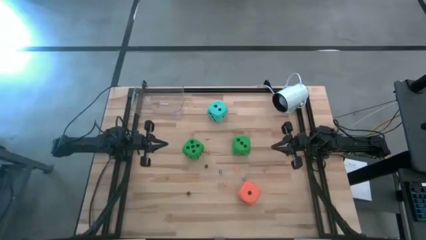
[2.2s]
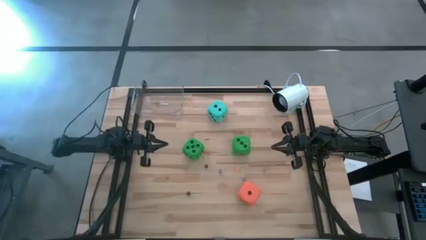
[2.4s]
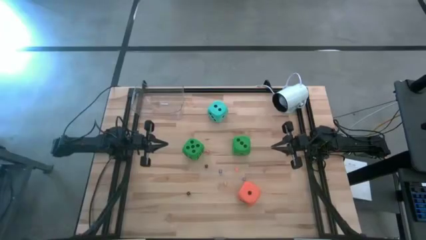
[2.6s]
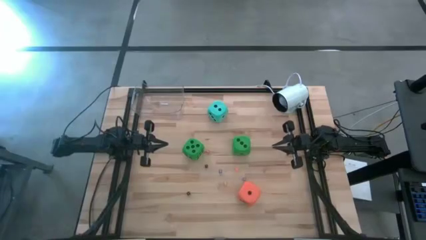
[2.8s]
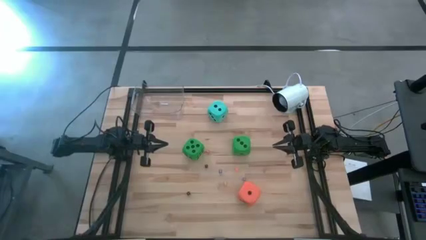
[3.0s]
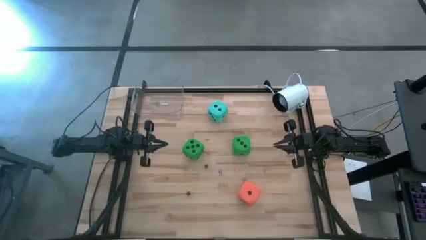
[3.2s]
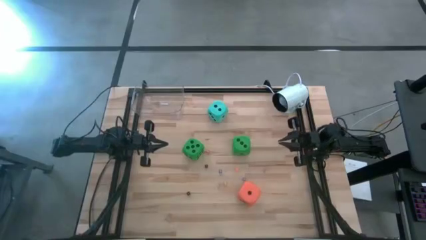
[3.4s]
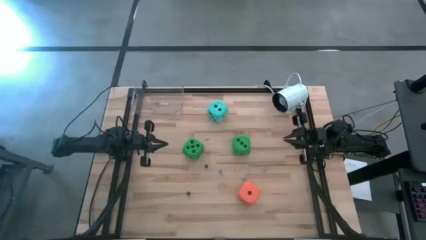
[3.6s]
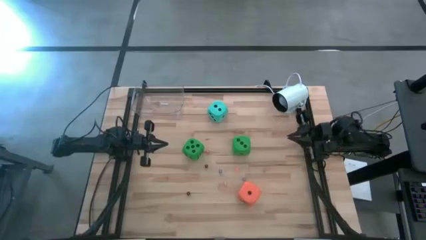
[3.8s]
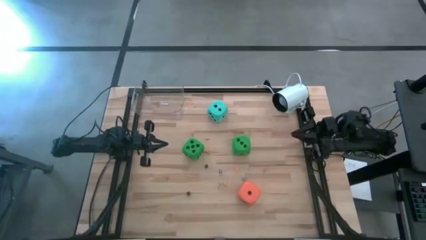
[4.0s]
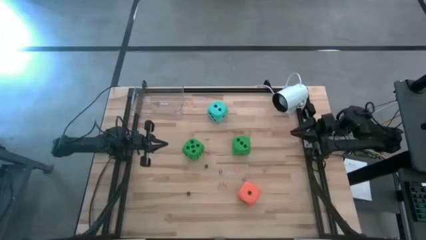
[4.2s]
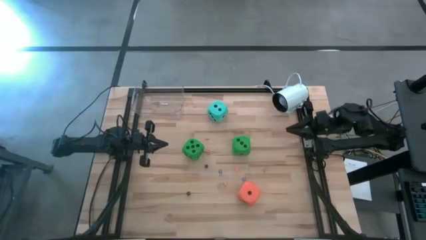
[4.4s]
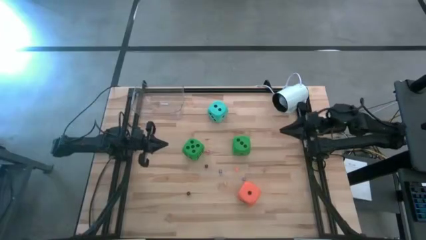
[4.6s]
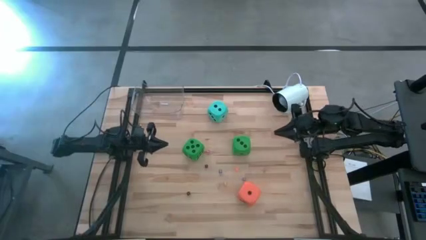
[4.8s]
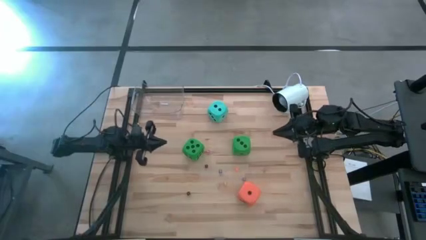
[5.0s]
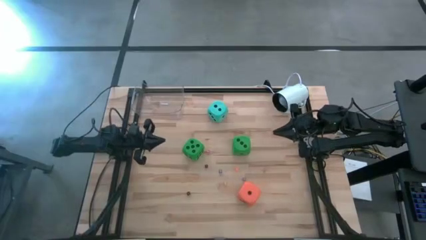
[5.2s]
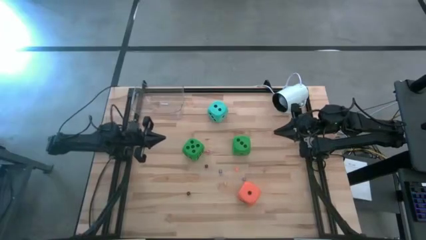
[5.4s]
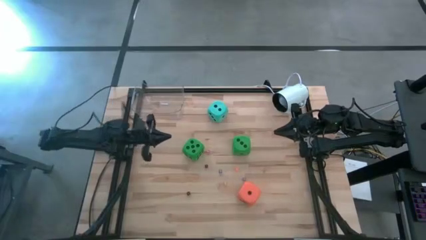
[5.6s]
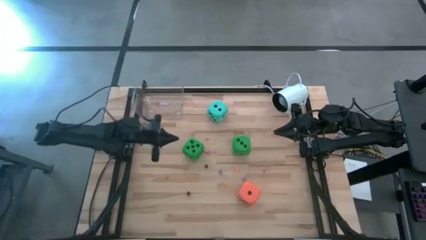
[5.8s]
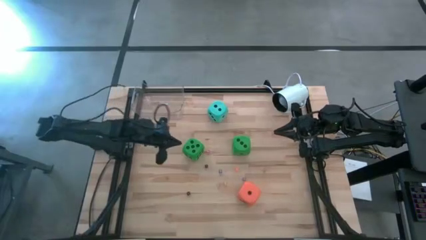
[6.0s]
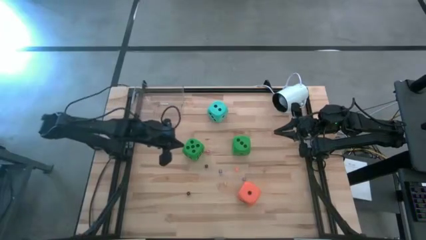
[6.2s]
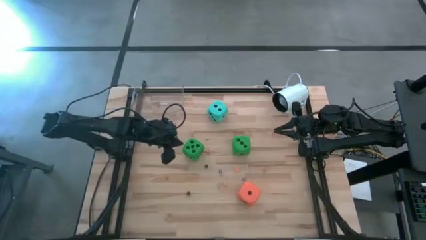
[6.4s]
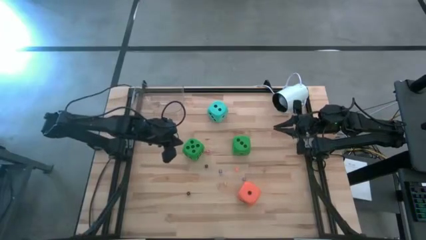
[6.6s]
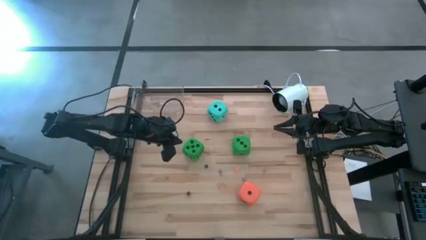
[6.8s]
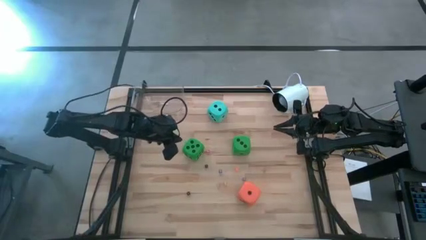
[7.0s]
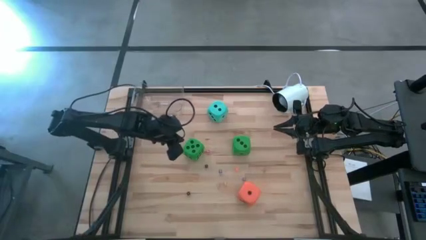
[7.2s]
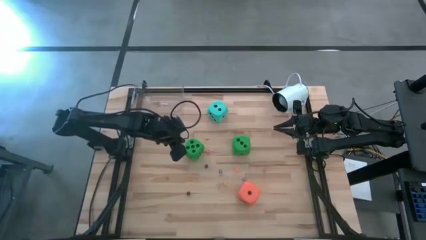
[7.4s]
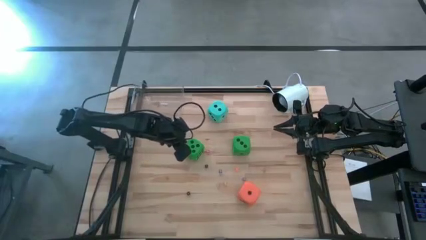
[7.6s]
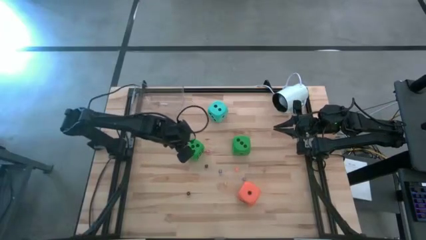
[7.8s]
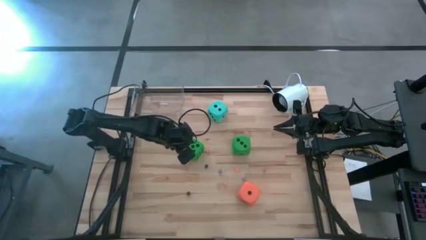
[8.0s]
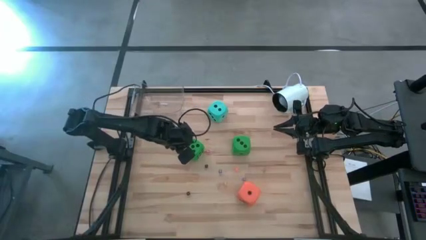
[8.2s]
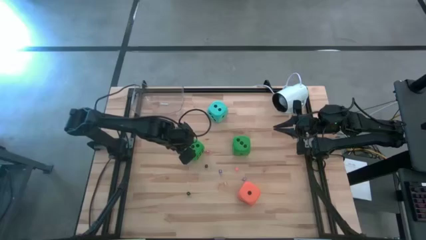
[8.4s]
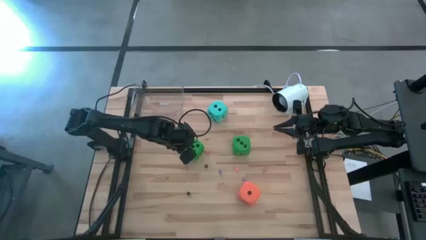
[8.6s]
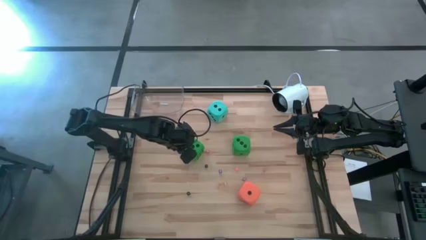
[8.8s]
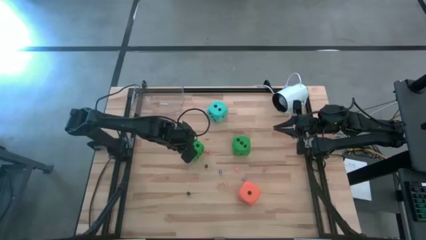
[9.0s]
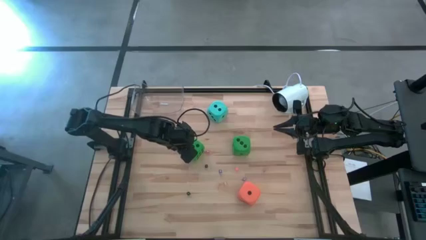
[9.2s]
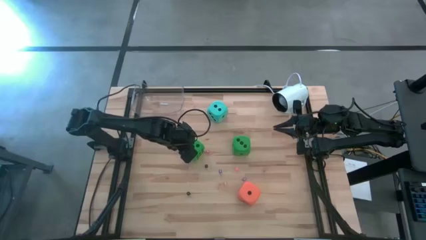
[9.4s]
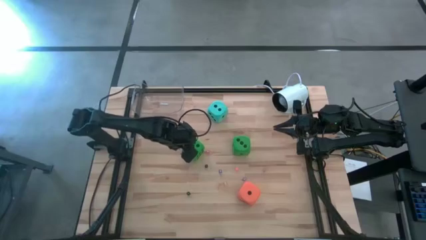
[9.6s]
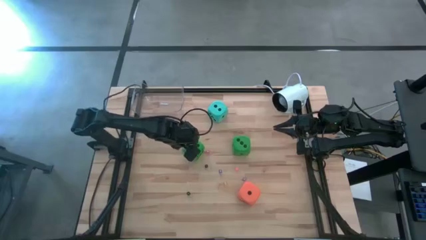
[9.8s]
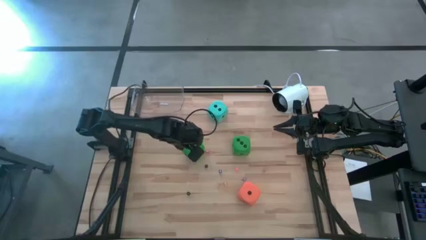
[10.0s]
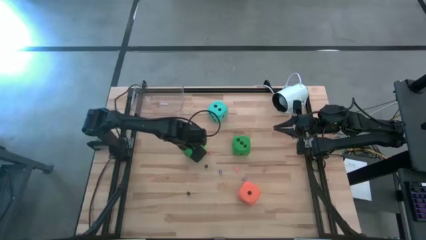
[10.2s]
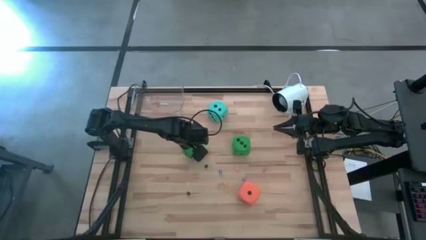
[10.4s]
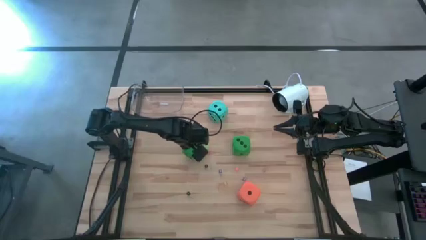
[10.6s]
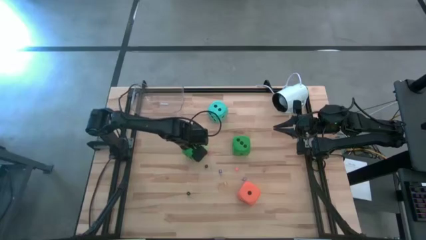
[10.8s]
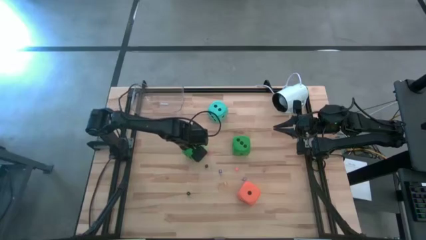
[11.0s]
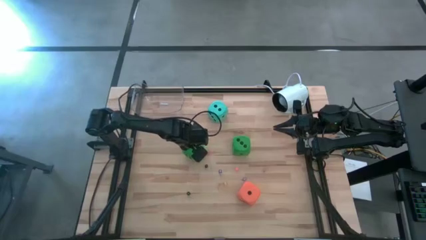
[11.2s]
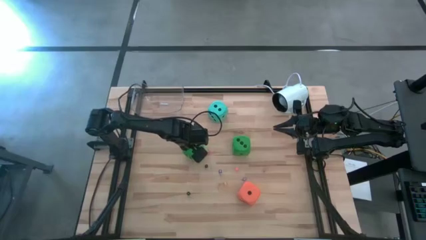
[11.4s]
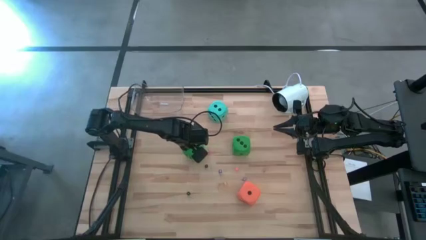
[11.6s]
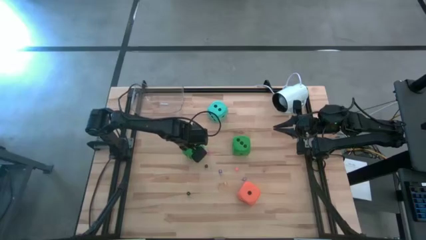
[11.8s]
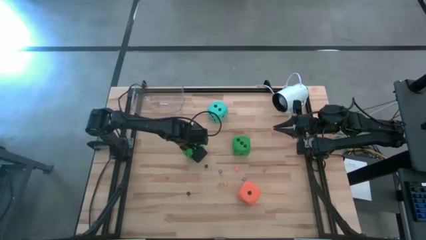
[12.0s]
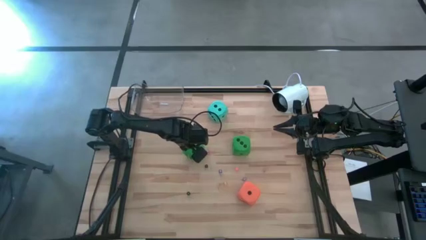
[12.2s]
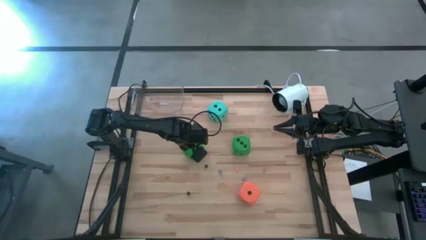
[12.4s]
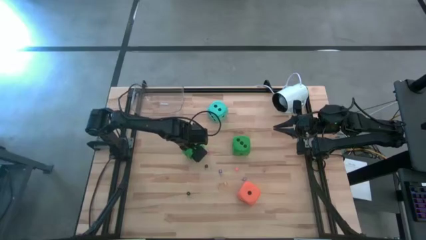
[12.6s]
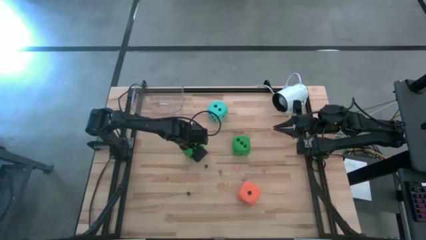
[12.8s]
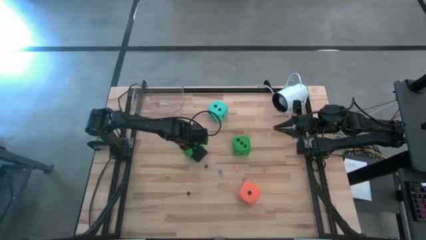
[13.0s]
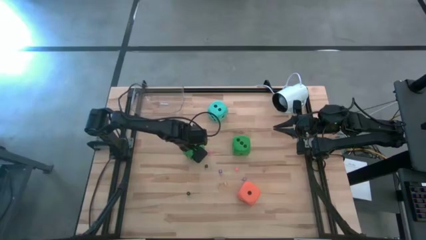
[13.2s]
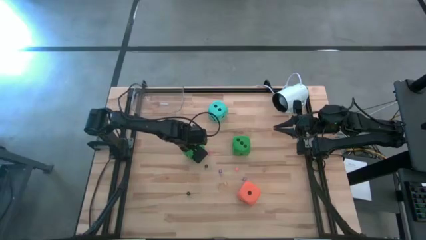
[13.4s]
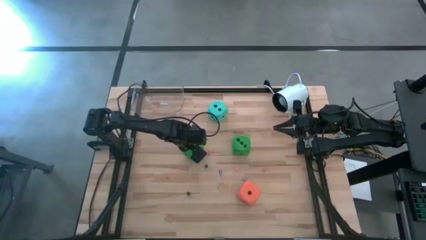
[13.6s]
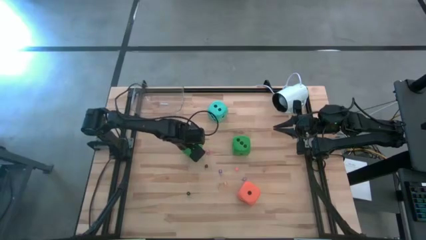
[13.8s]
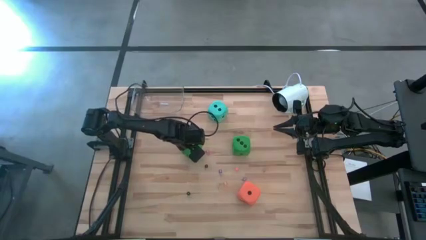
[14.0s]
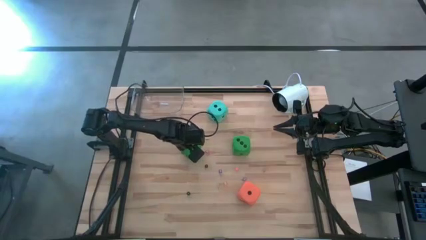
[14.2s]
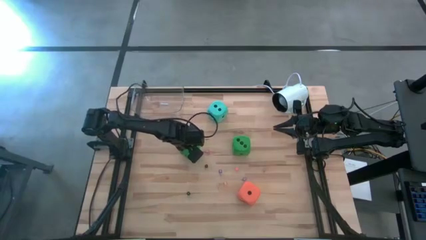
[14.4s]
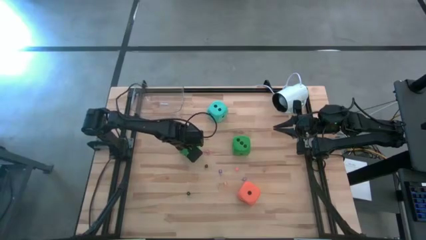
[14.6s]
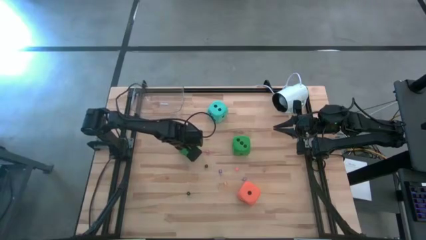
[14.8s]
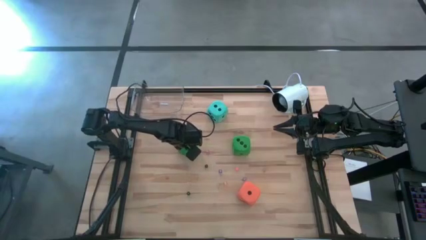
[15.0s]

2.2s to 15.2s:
Task: Pick & Place Dice
Put the left large green die into the transparent bin
